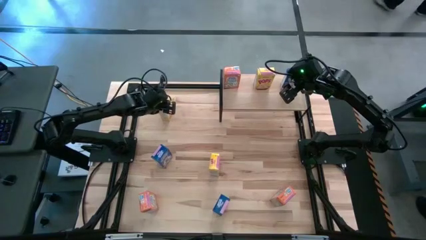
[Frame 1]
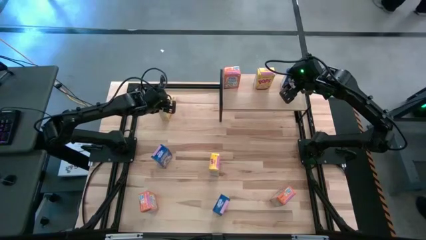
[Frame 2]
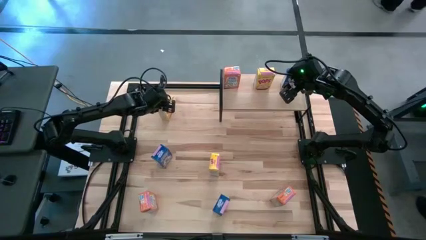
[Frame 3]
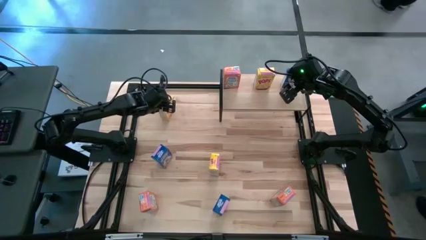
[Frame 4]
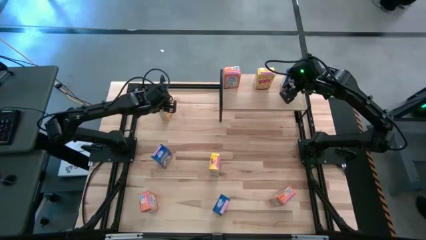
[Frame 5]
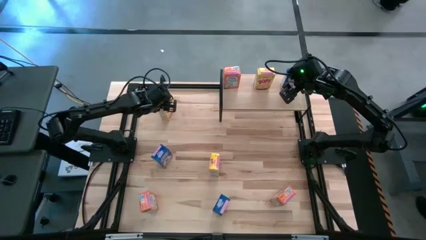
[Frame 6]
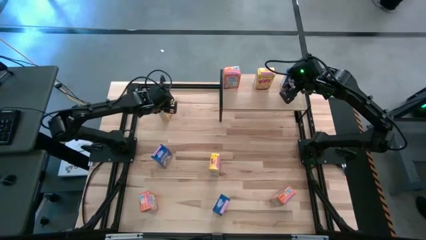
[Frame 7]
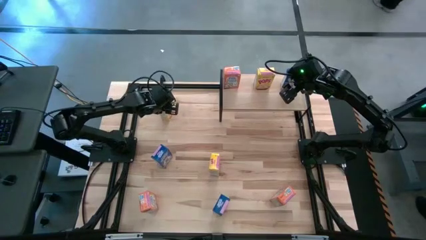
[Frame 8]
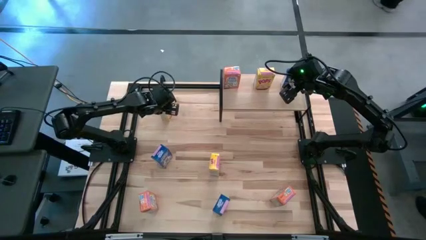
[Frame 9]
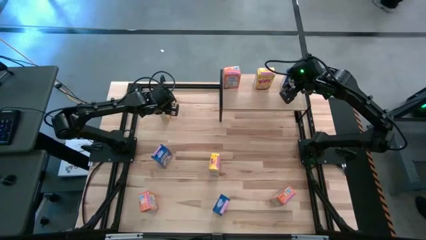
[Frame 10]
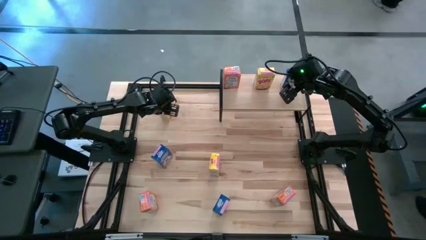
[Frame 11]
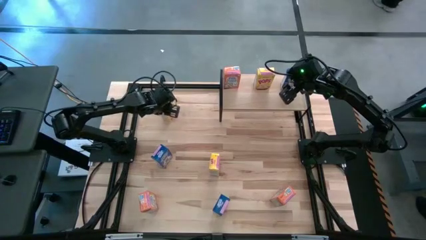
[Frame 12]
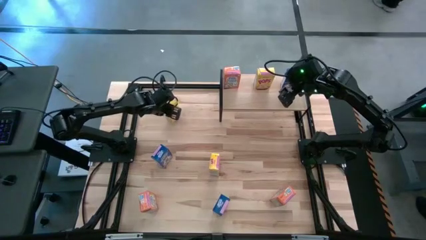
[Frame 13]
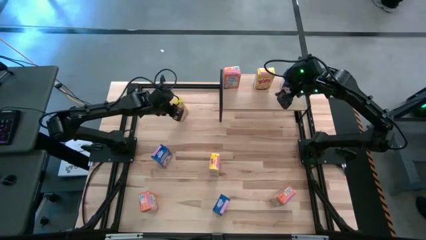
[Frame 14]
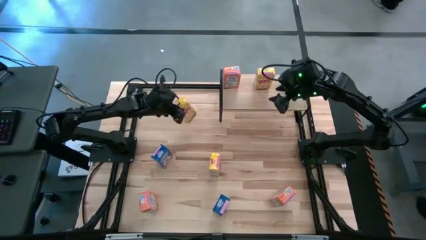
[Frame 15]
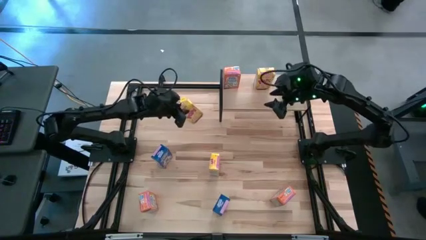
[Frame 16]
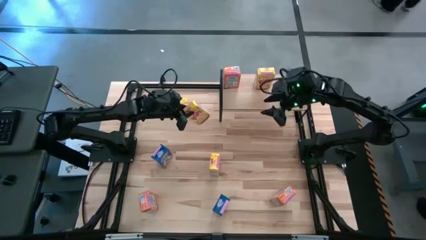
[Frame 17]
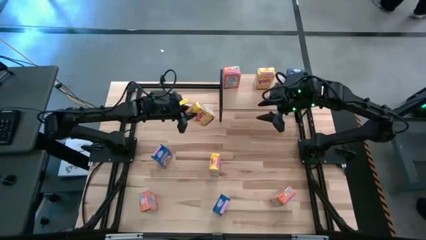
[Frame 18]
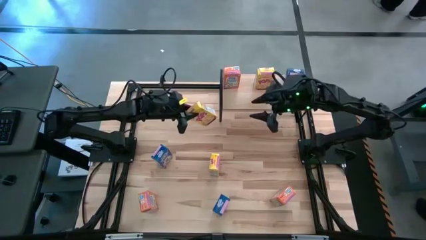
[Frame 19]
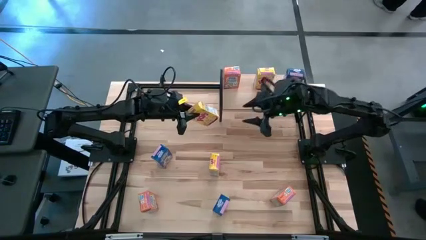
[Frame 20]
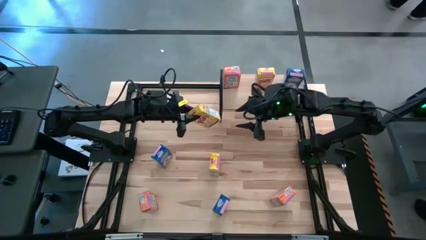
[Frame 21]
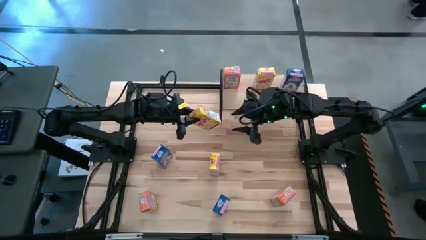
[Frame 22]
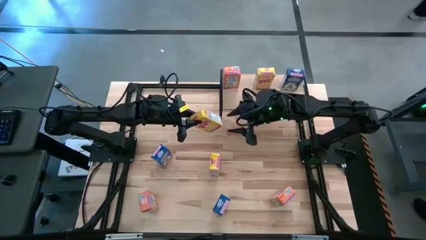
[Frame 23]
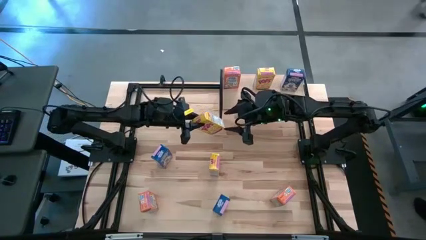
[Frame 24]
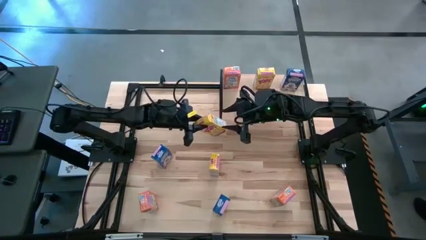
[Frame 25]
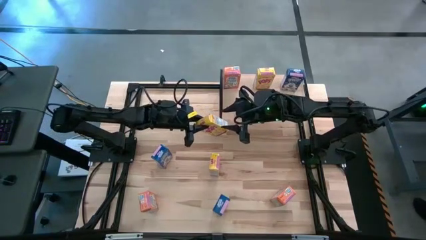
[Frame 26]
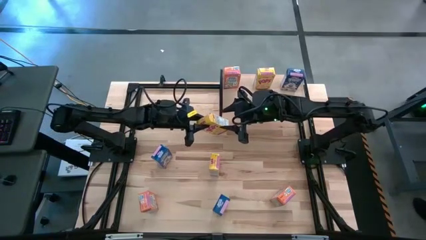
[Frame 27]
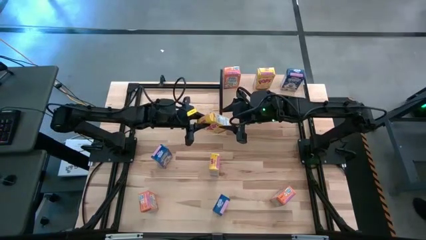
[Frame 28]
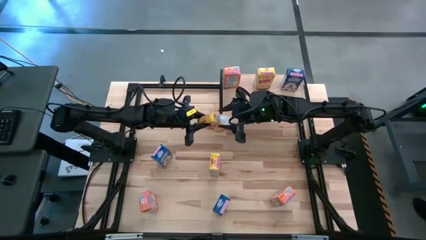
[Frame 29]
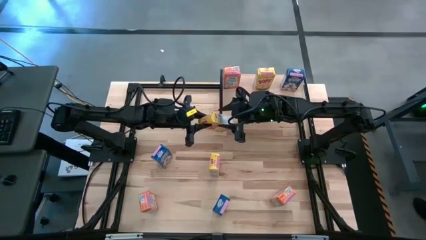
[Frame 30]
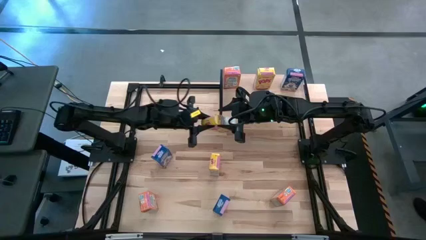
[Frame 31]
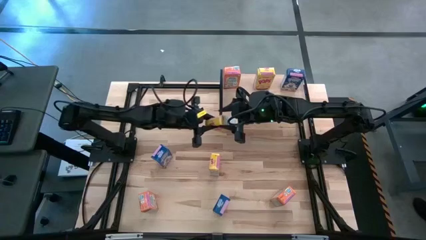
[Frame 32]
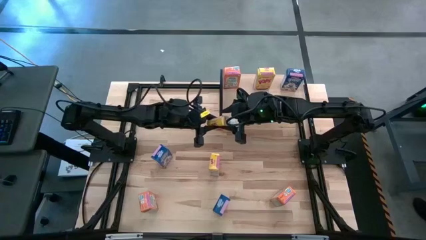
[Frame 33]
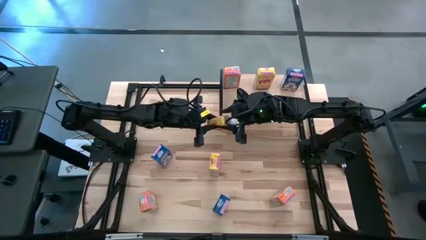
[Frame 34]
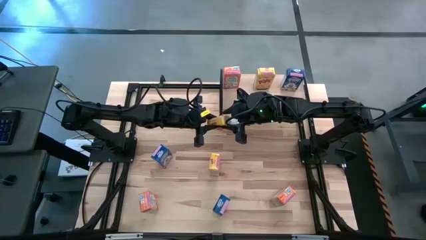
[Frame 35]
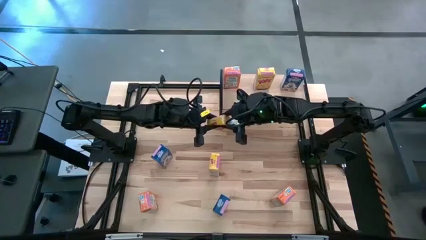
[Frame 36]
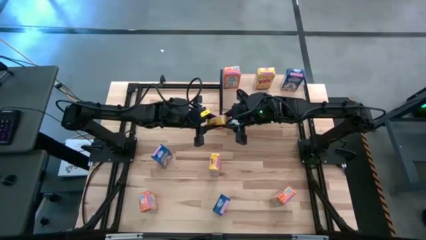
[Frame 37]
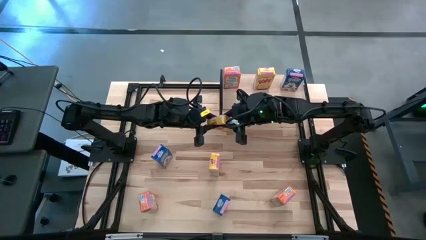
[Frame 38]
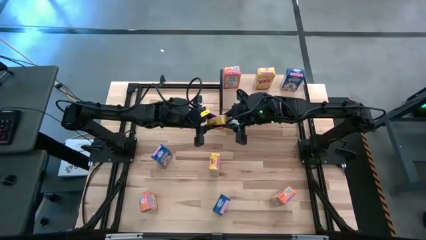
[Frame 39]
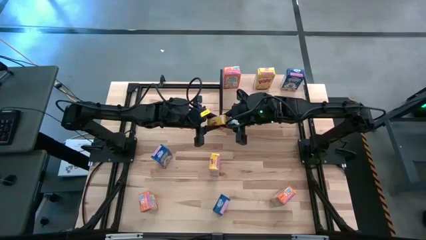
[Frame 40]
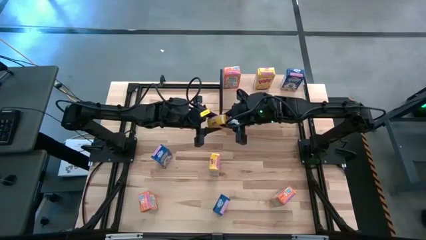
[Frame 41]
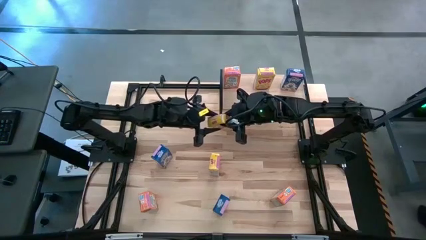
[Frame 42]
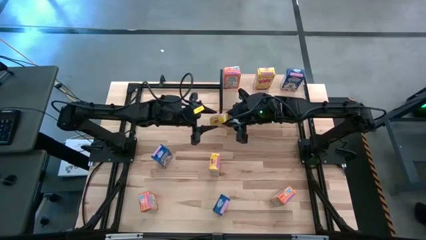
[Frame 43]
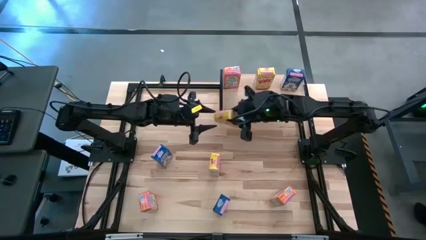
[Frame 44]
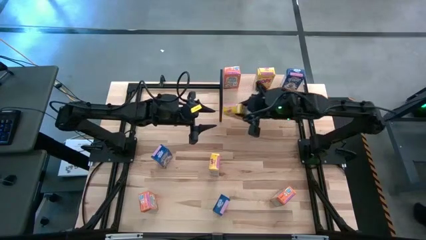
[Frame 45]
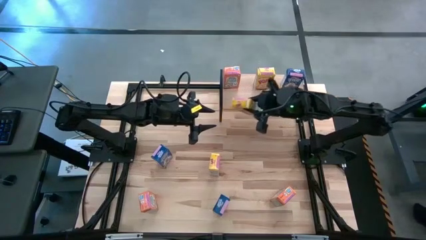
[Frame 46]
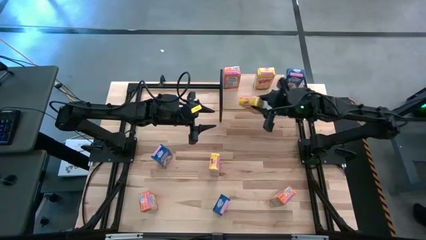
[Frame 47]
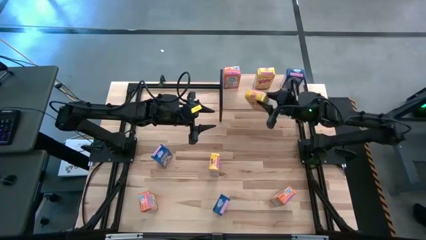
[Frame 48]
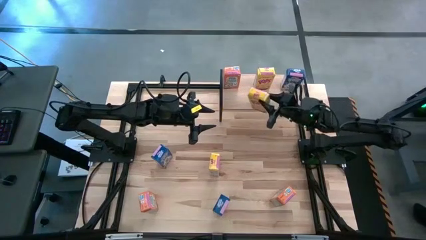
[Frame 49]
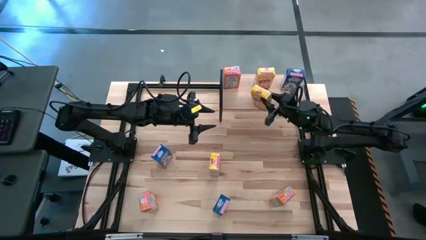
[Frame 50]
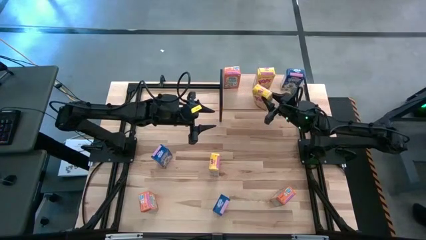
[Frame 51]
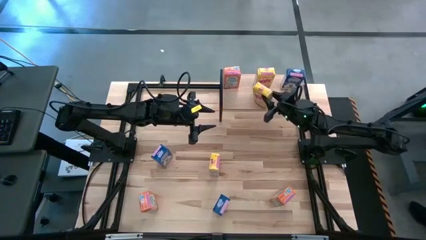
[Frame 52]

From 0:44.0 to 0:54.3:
Task: Stack cereal on shelf
Put the top yellow cereal box on the shelf aligned with the yellow cereal box

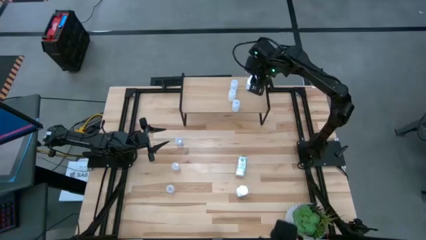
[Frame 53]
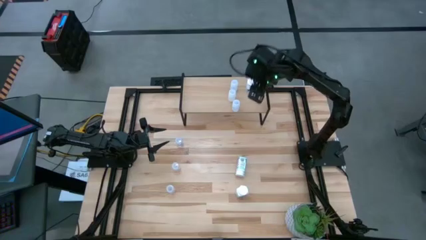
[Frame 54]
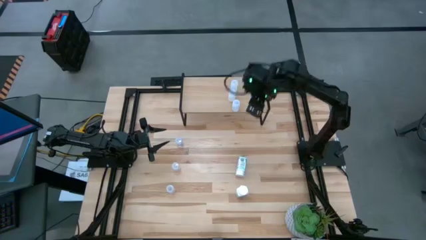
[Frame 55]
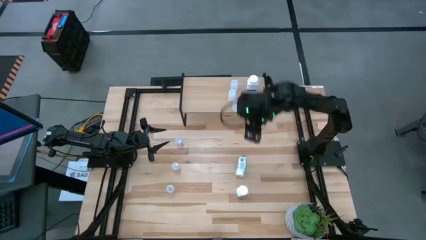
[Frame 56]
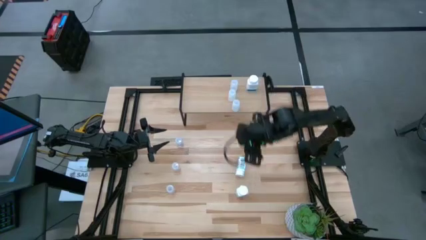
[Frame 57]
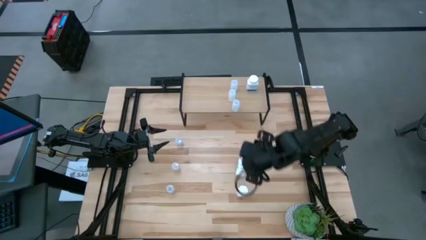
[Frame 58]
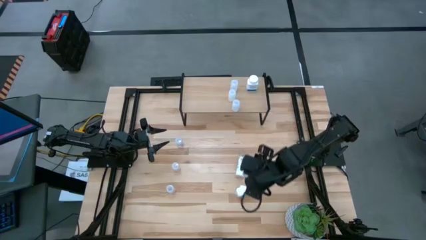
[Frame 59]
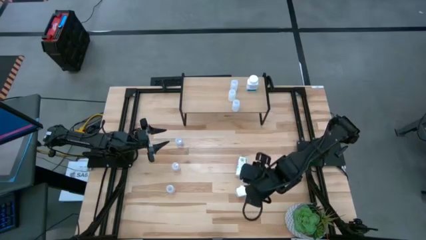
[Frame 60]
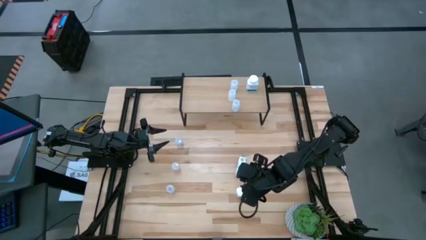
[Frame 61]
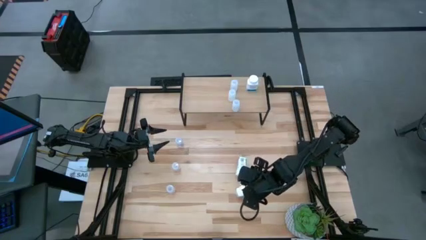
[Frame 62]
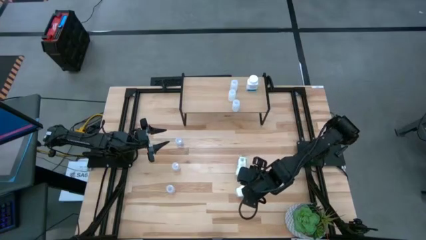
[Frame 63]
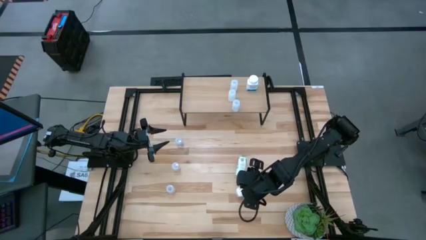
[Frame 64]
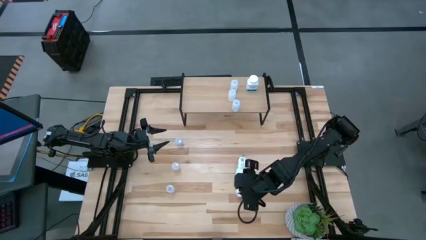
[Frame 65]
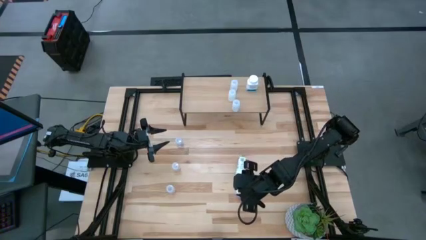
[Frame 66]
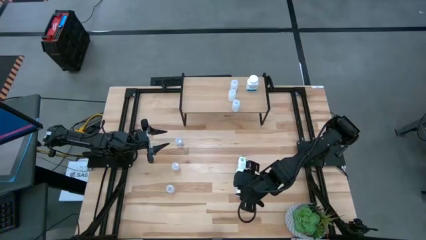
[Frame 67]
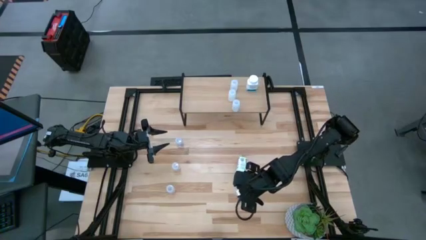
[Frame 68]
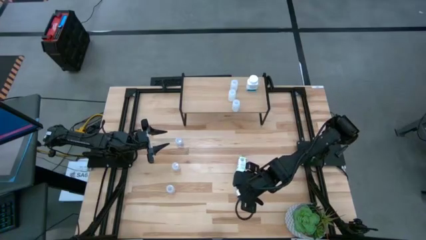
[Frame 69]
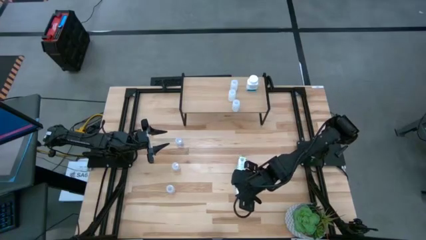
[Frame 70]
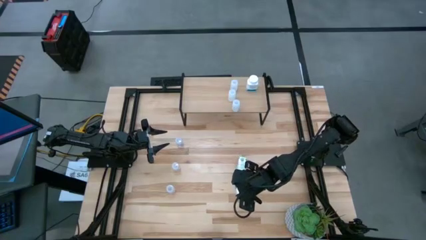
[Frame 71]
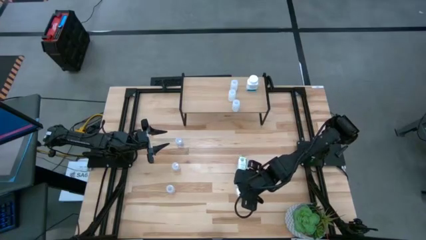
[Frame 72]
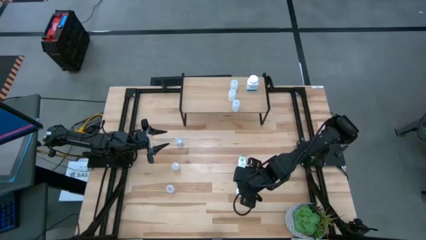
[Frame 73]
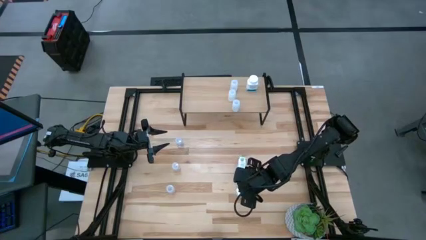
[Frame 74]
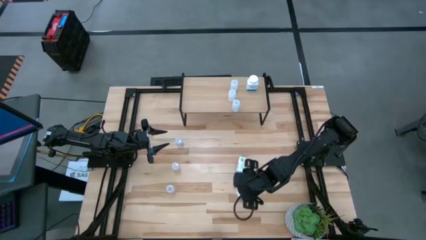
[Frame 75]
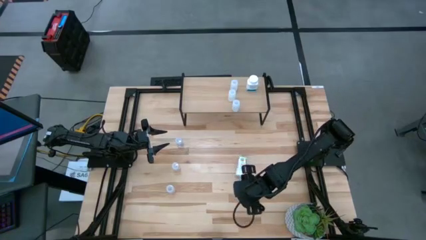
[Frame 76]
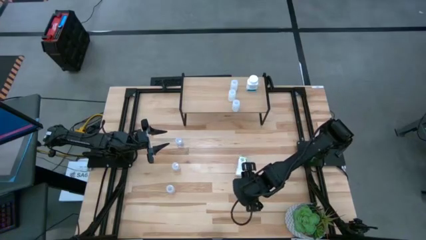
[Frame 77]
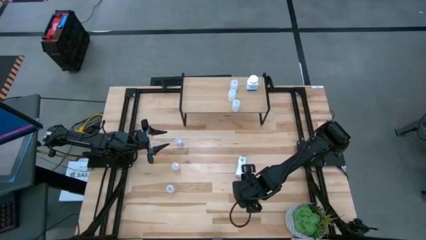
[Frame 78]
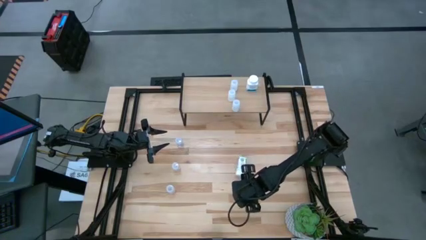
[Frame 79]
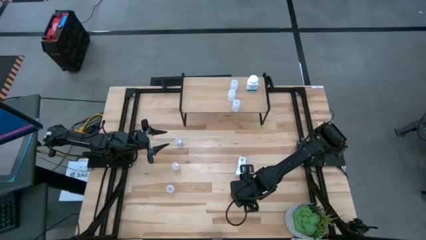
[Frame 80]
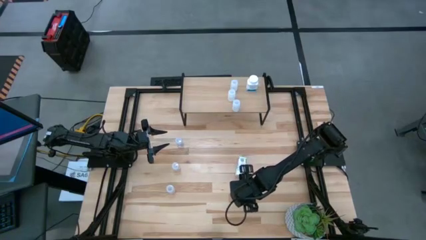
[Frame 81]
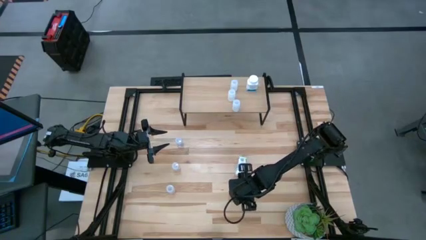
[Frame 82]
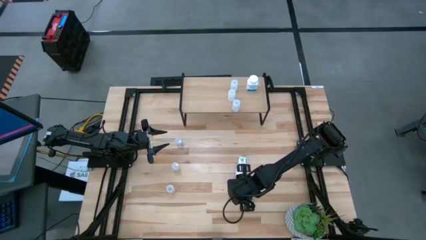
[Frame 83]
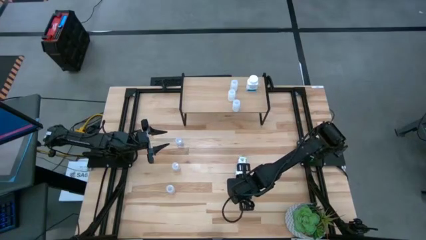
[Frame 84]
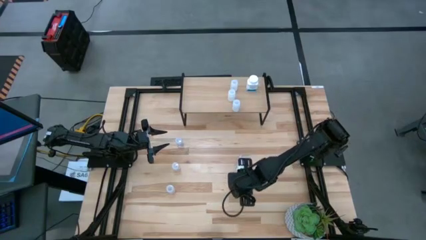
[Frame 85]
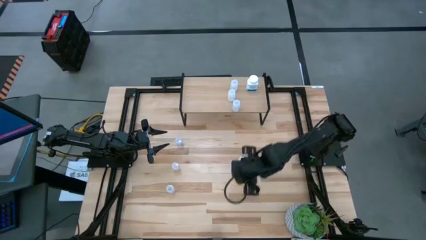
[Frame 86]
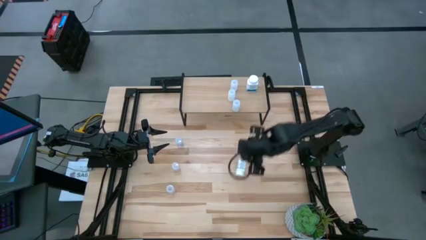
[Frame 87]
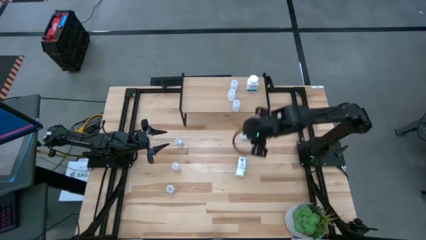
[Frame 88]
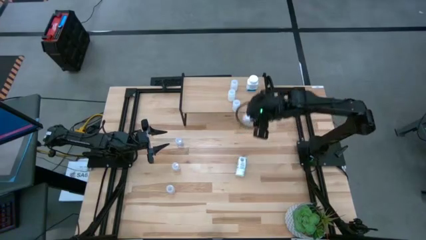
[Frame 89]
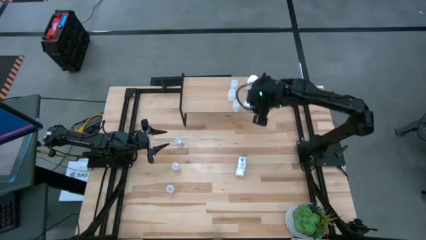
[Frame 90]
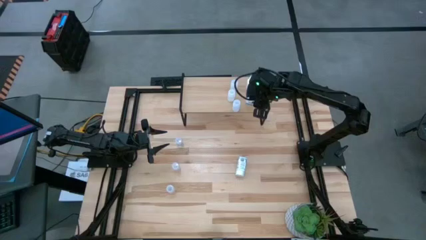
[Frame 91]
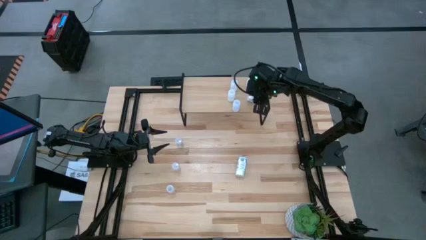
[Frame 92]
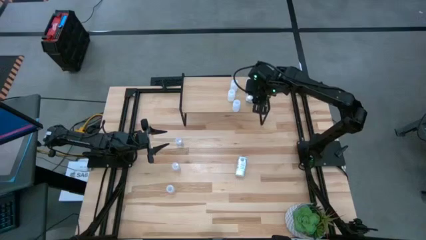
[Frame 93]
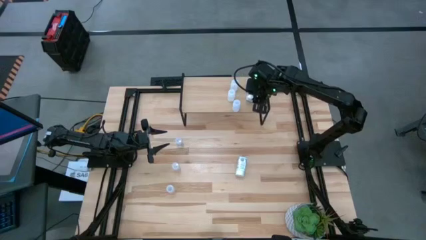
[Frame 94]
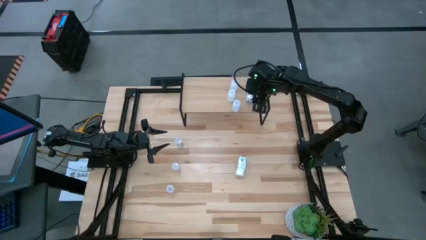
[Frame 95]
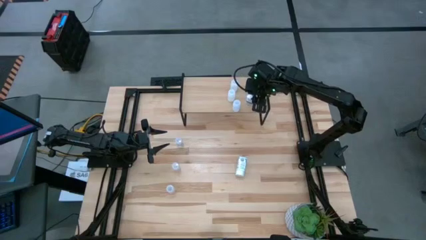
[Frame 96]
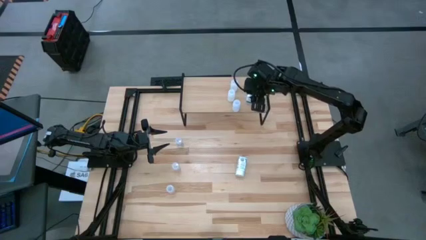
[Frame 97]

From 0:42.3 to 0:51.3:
Task: Pick and place medicine bottles onto shelf by color
Put the large white pill bottle on the shelf aligned with the other large white pill bottle
